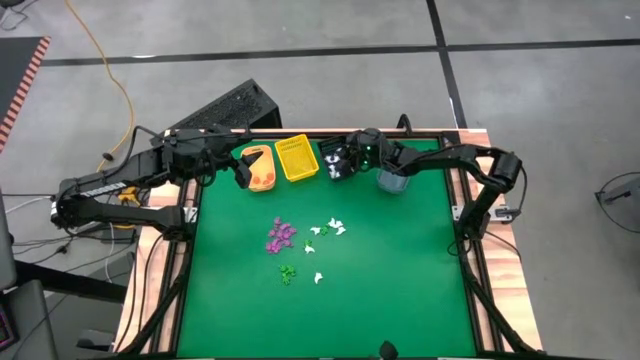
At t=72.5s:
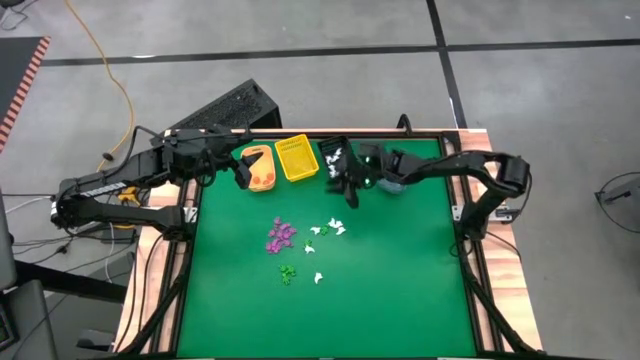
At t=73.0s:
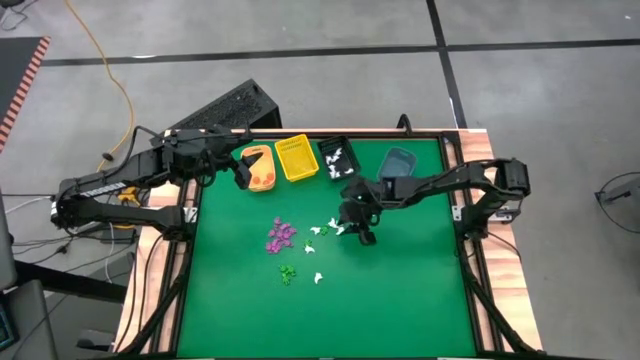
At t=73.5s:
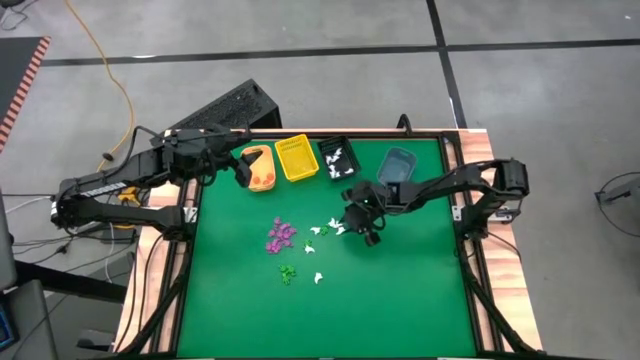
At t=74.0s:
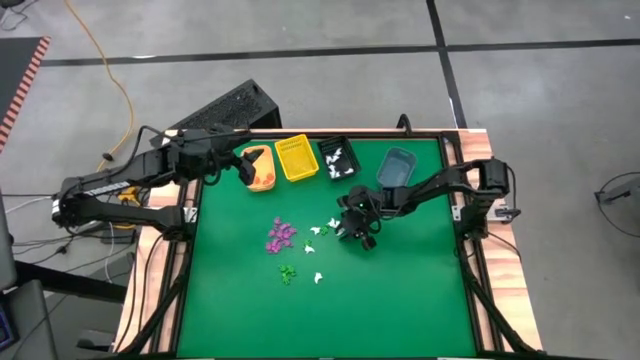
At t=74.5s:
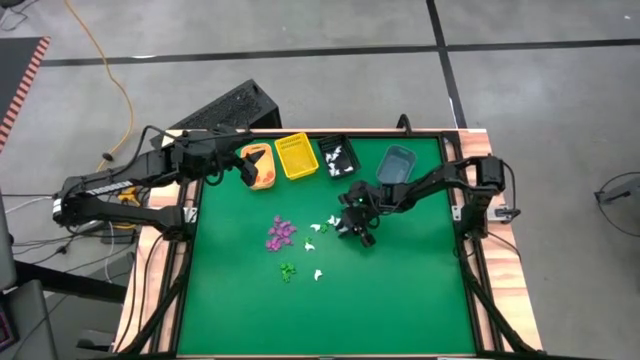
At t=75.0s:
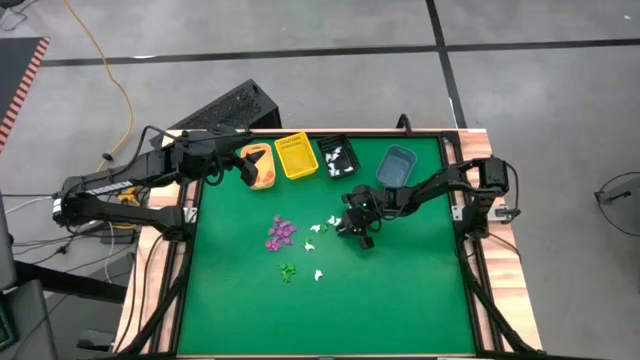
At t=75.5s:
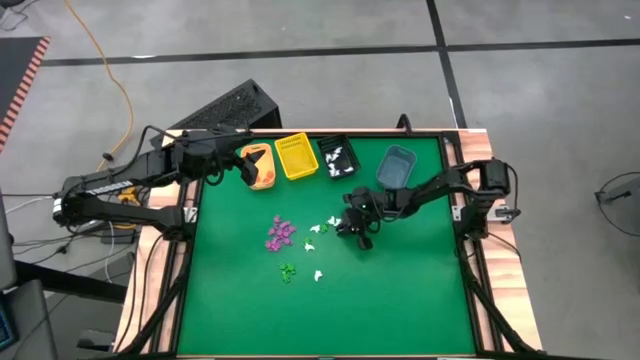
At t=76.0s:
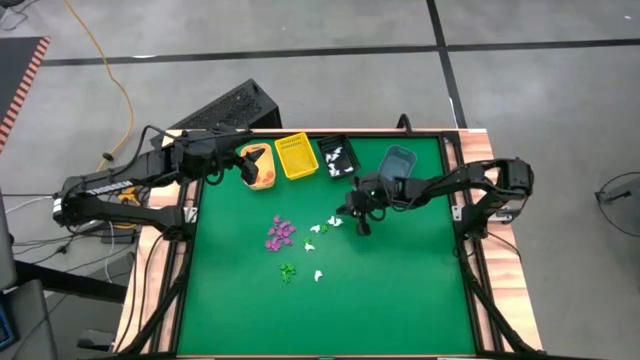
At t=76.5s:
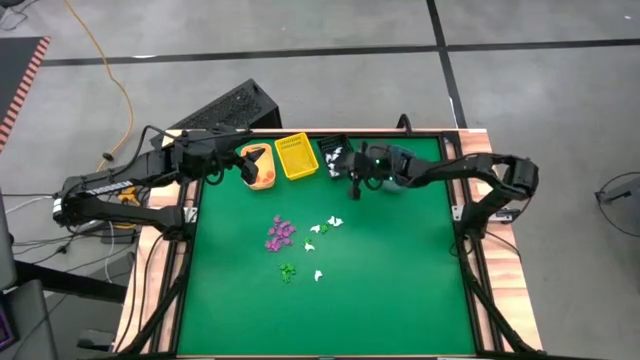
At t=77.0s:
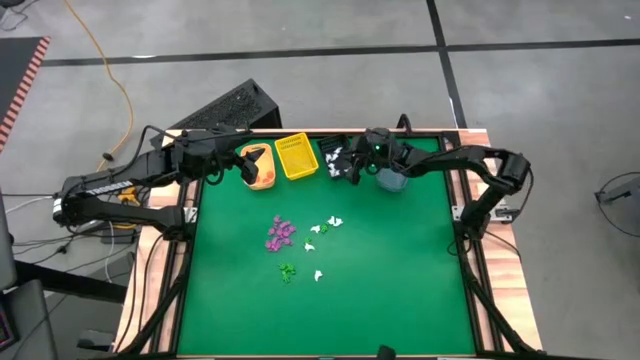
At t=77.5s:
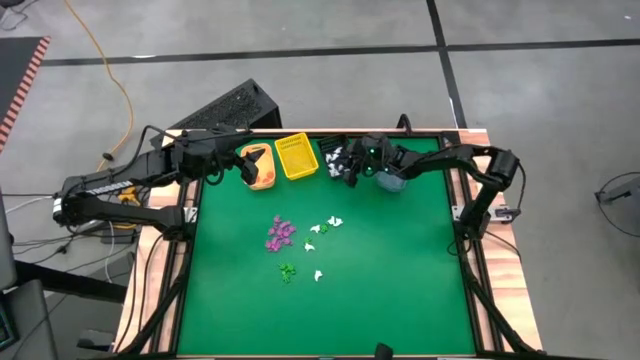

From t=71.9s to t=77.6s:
Task: Sort Halloween decoration
Put the white ghost toy into the black bin

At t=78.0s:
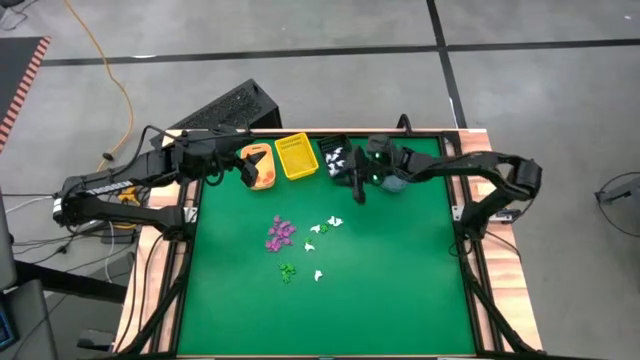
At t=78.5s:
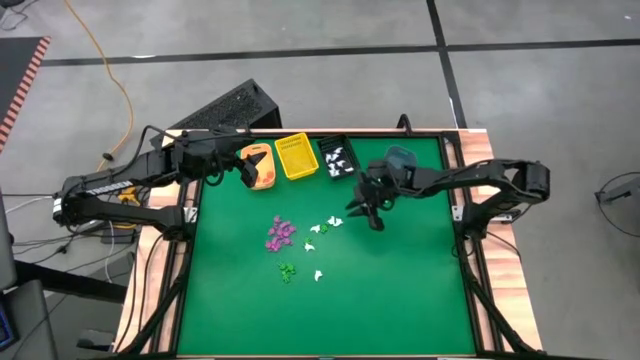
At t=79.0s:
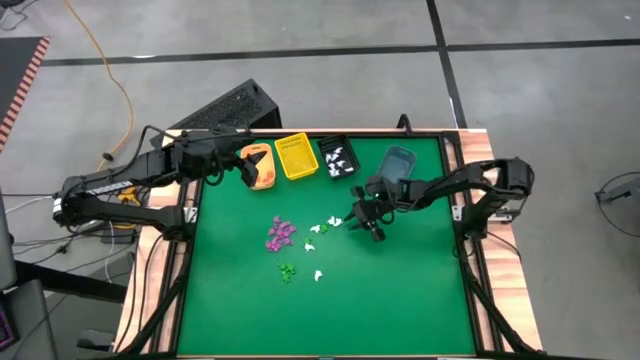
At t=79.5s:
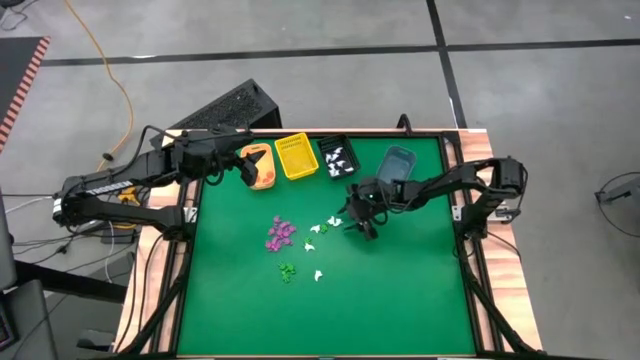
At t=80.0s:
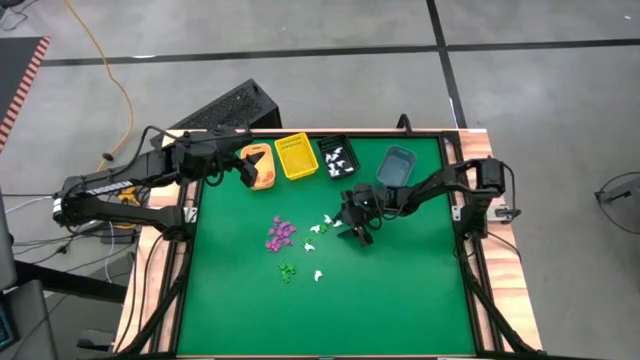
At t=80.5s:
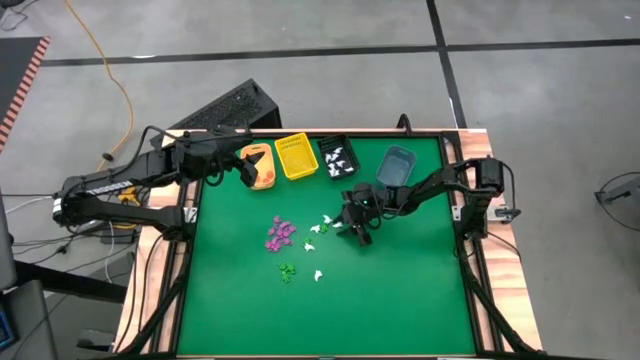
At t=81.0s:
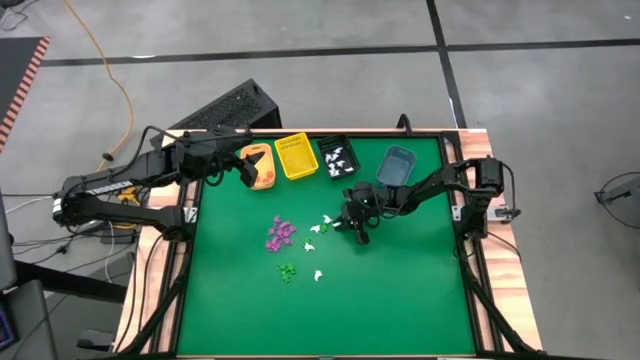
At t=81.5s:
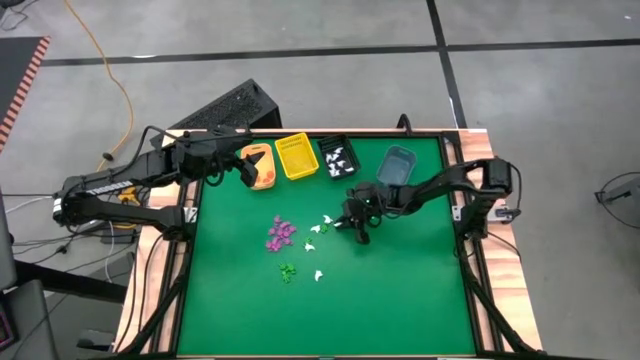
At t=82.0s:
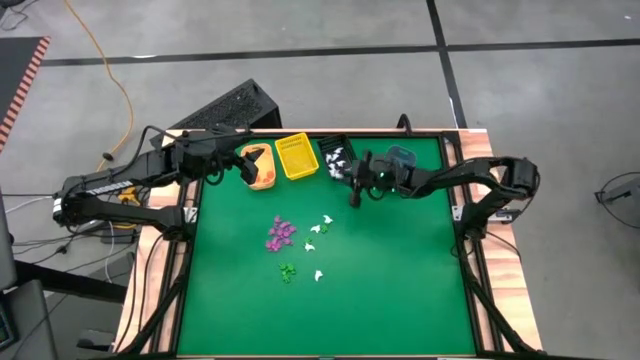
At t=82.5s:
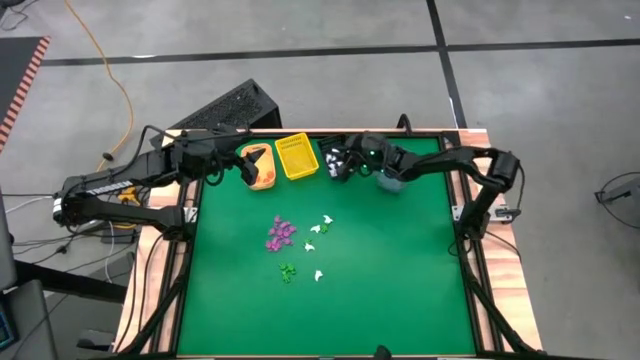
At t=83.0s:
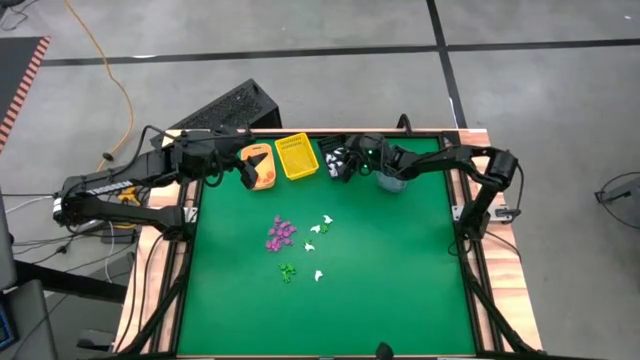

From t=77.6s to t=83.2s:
Put the white ghost toy into the black bin

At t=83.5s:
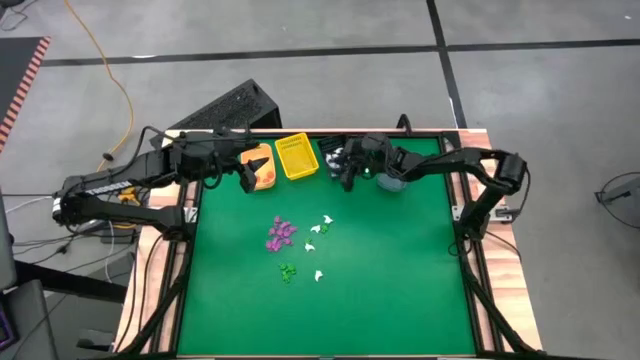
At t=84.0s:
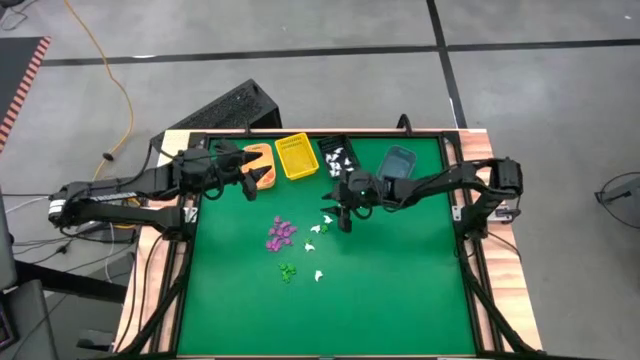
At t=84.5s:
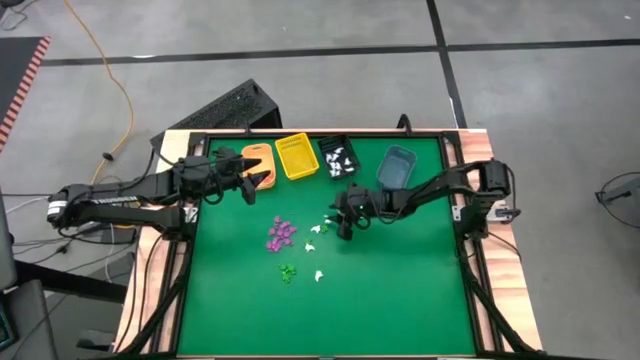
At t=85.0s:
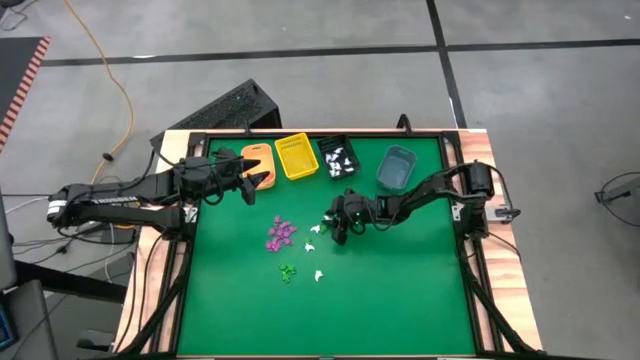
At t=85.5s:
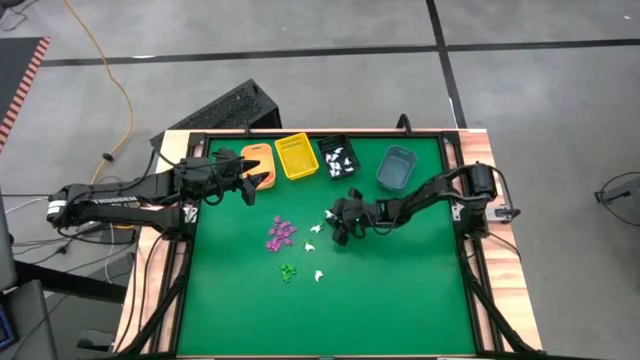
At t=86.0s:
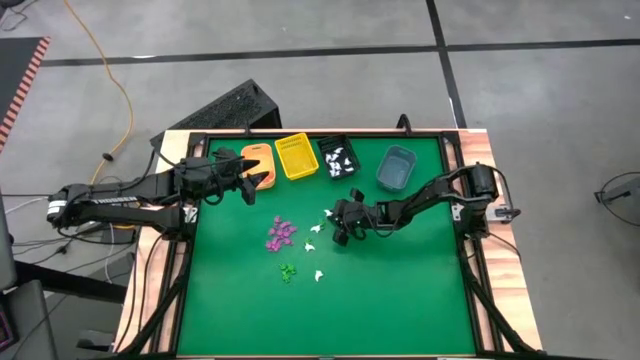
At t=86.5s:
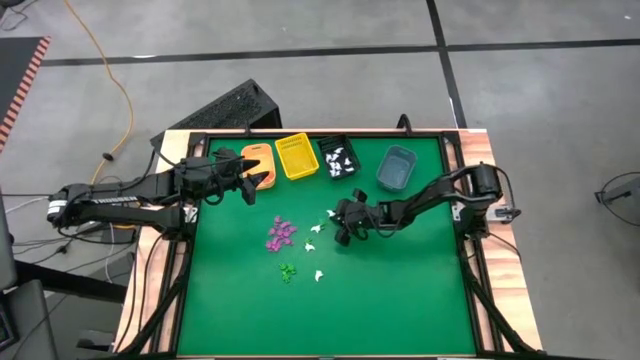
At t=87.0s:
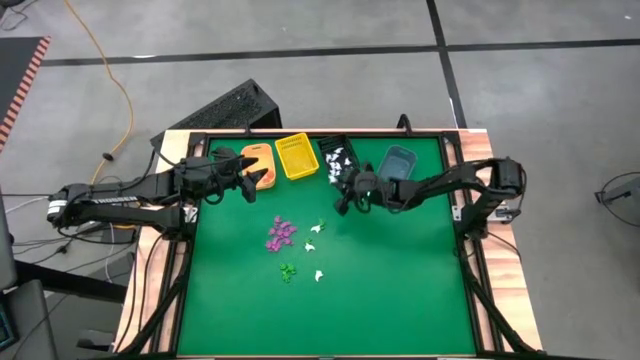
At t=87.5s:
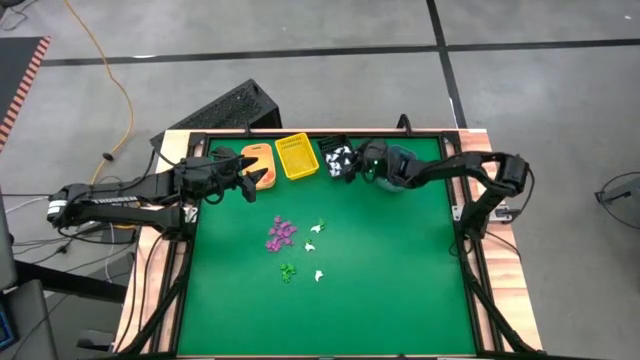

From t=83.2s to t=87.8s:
Put the white ghost toy into the black bin

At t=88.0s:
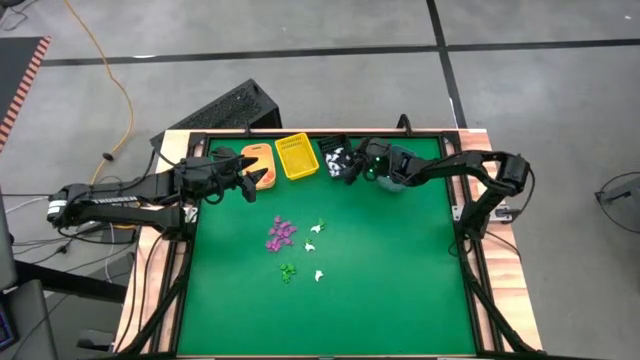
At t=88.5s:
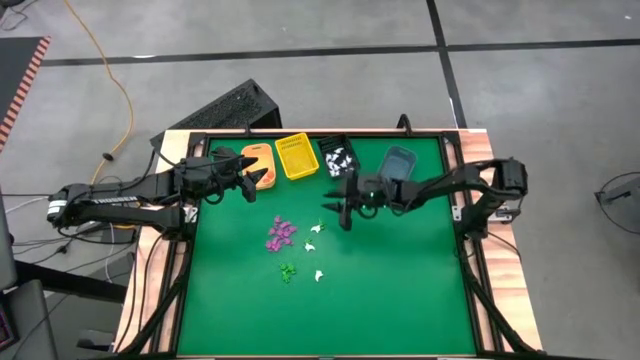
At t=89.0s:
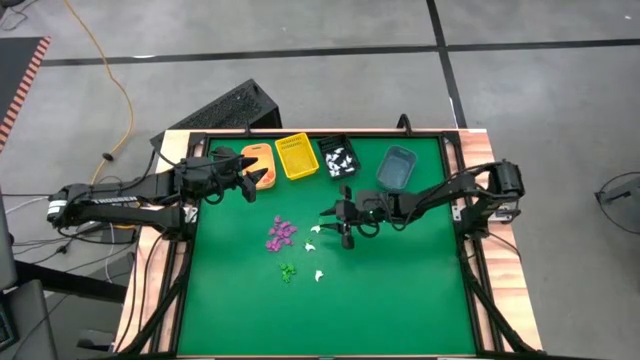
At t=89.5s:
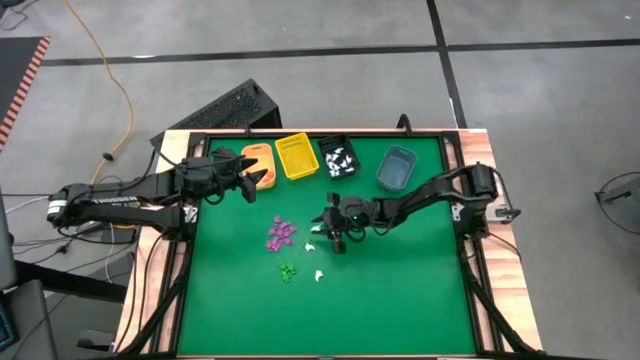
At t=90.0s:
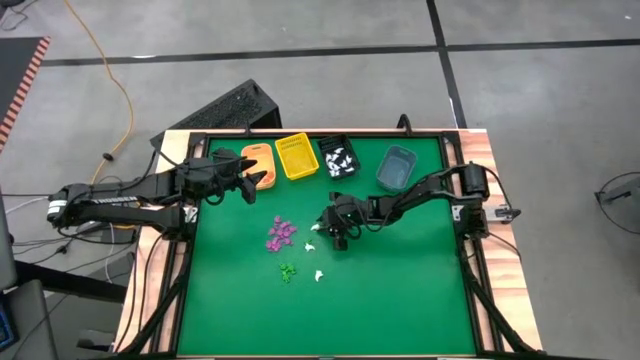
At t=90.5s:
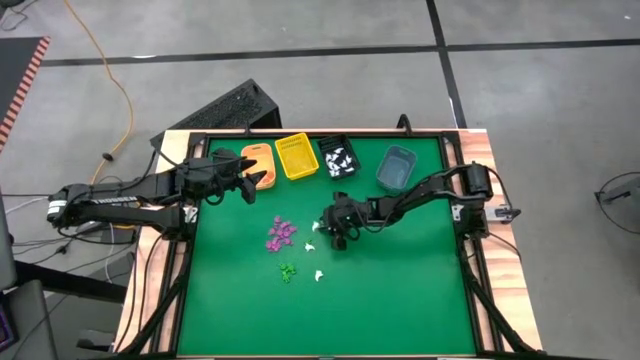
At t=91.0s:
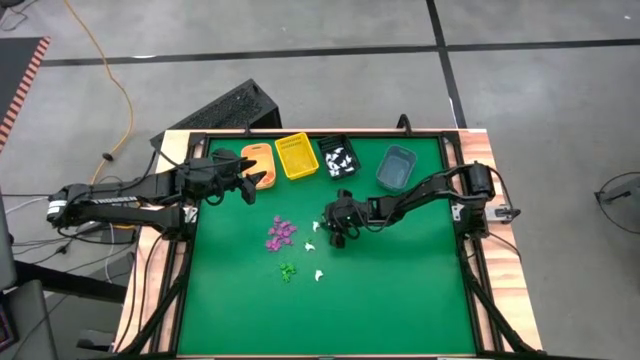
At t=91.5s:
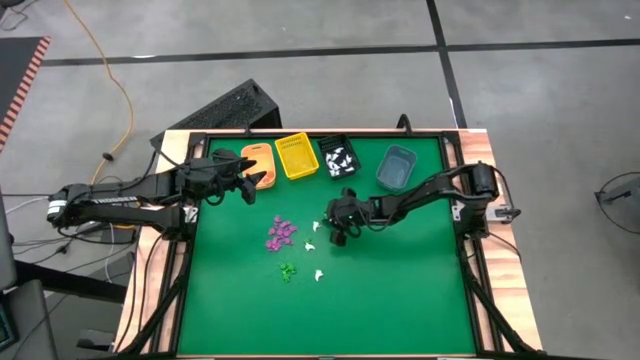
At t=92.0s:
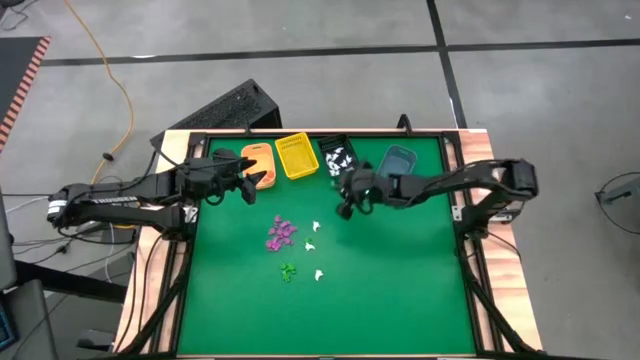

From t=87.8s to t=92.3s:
Put the green skeleton toy into the blue bin

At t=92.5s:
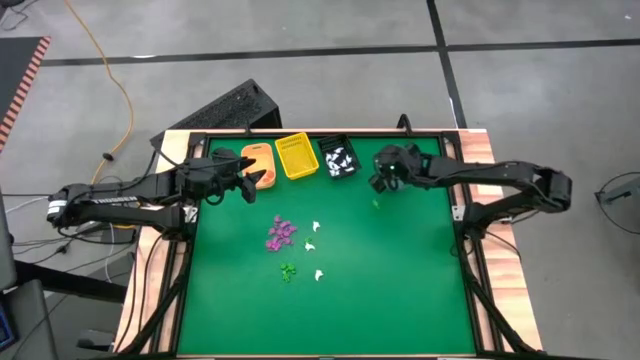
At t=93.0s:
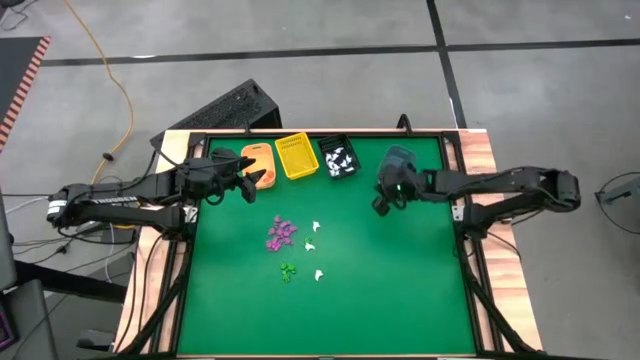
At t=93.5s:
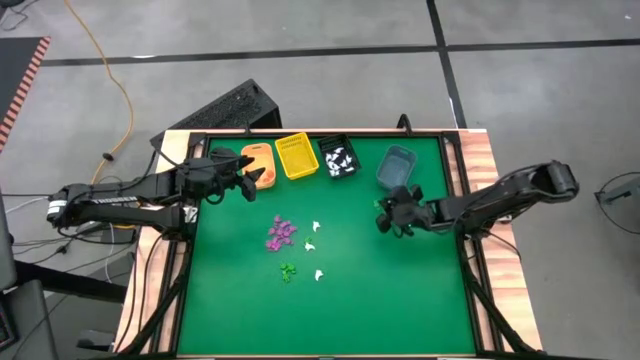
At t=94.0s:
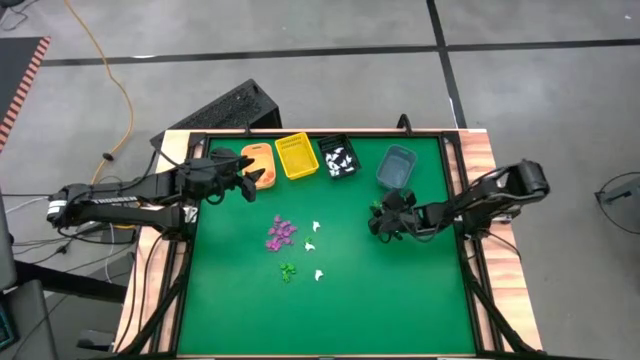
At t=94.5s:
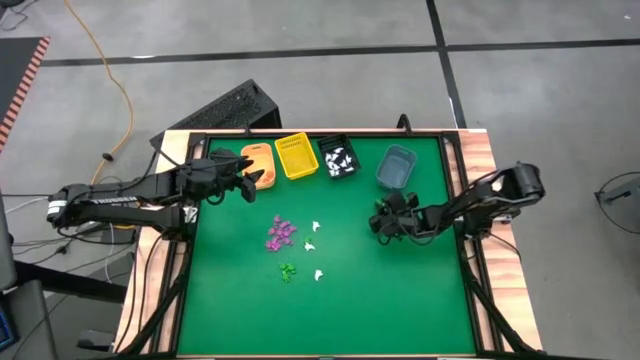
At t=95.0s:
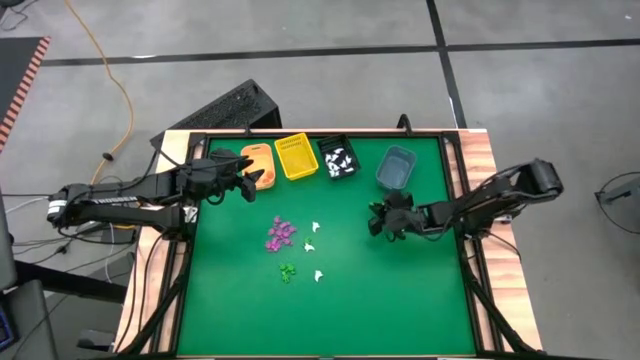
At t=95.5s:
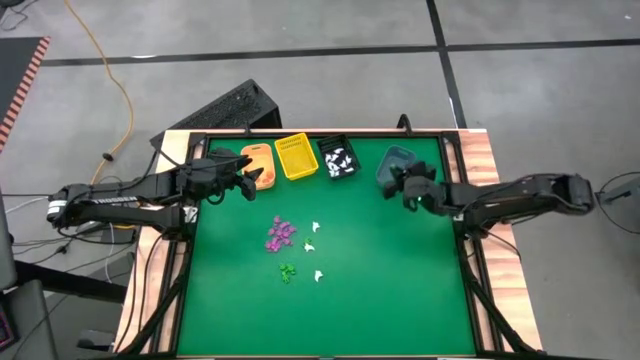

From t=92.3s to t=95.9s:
Put the green skeleton toy into the blue bin
